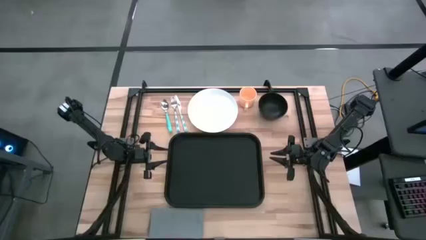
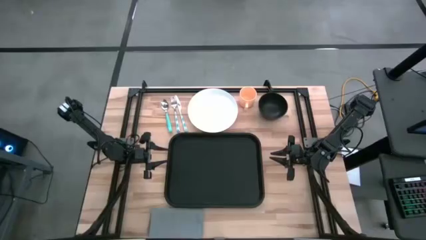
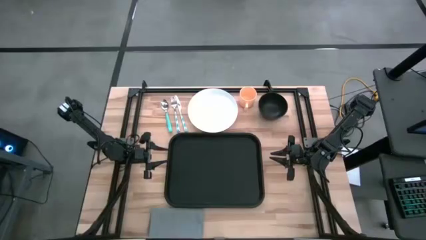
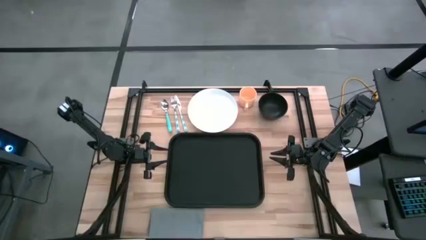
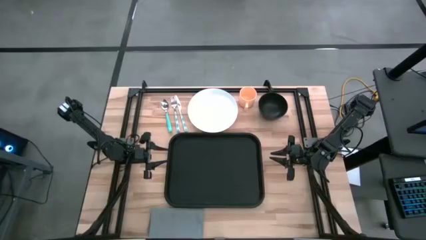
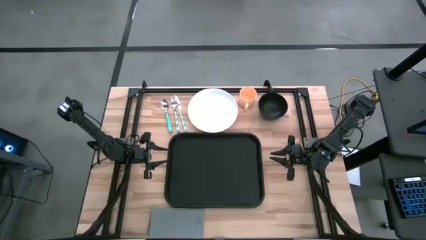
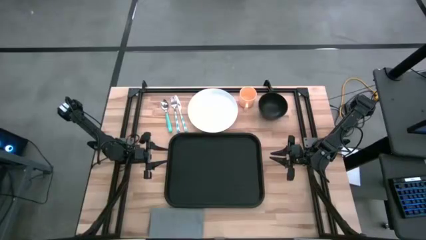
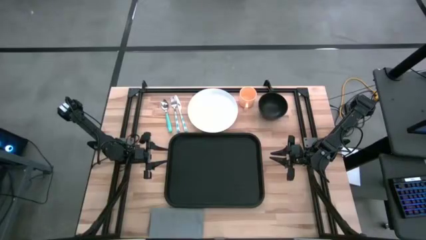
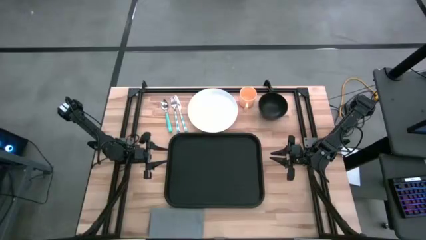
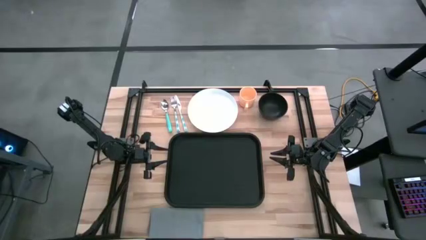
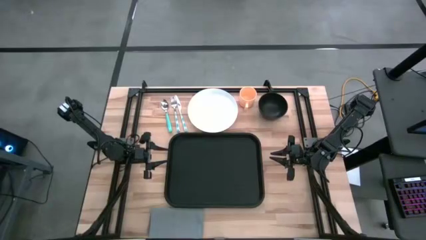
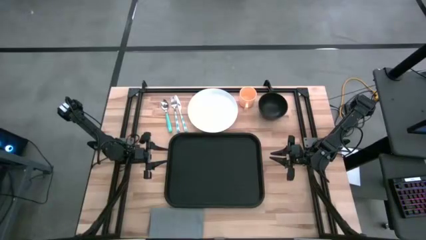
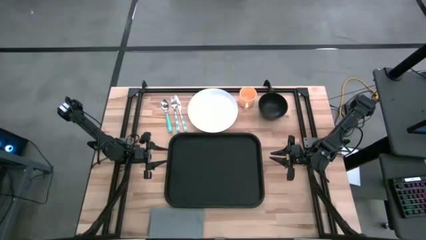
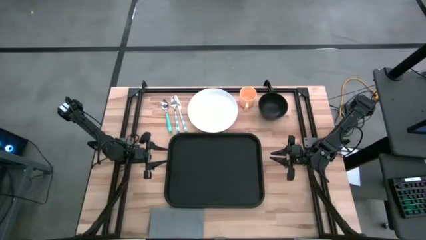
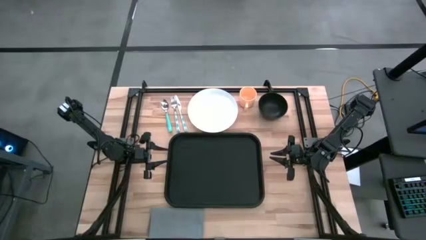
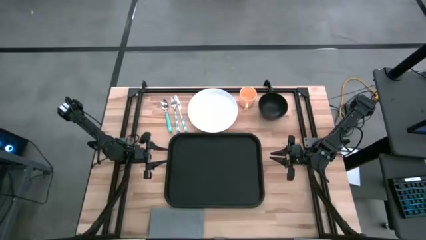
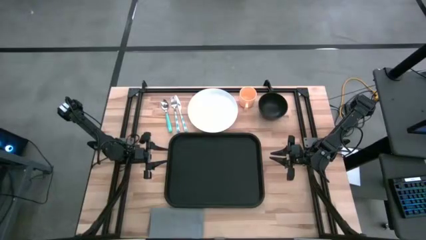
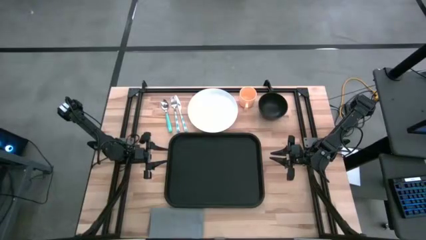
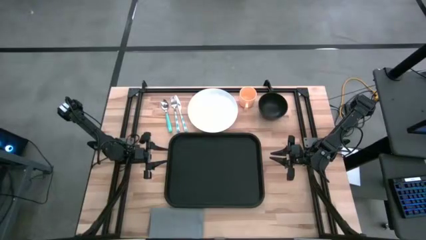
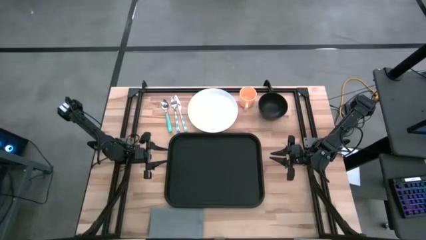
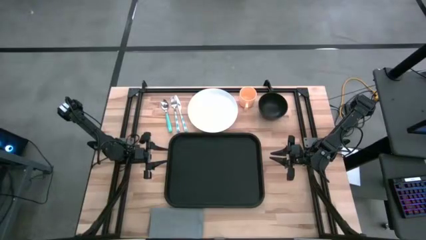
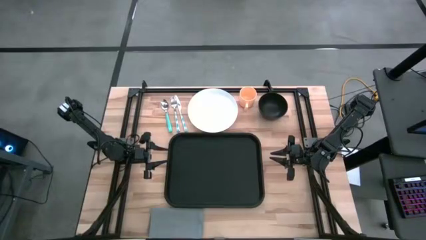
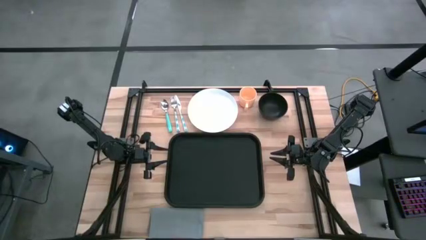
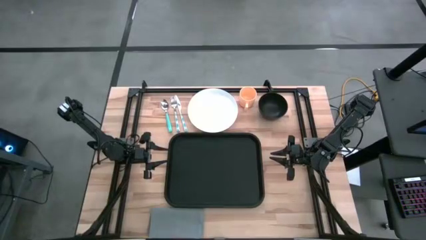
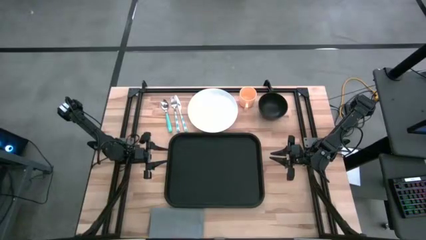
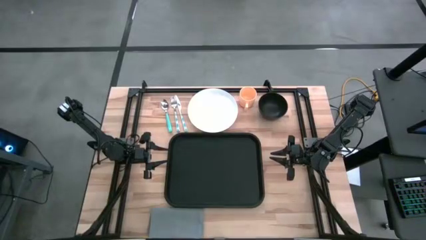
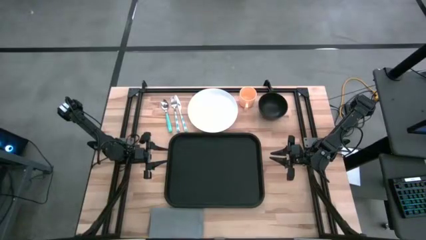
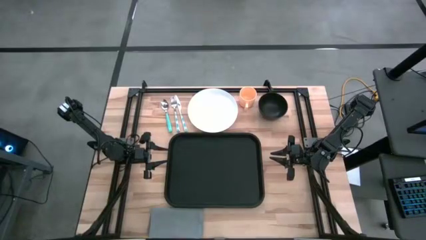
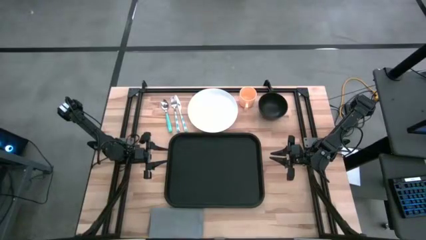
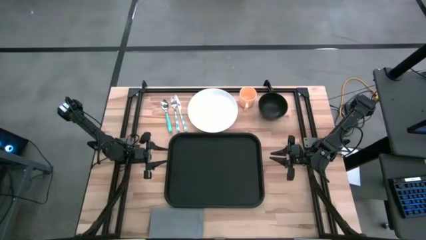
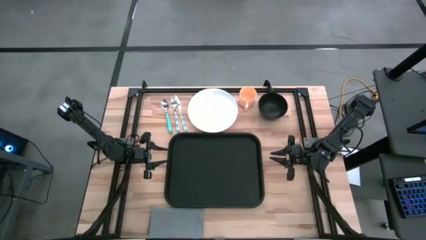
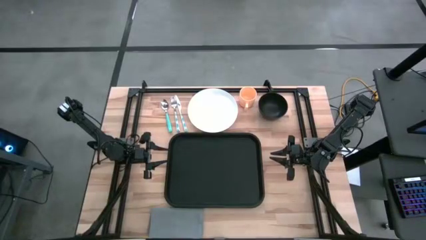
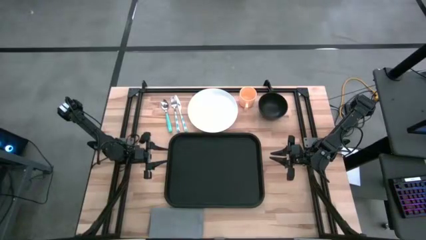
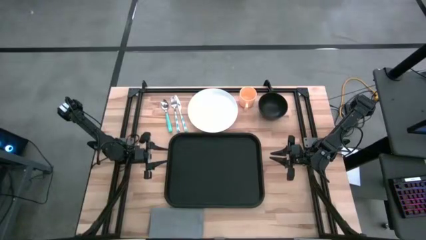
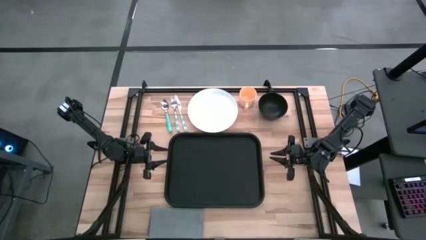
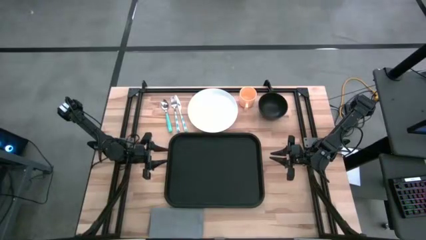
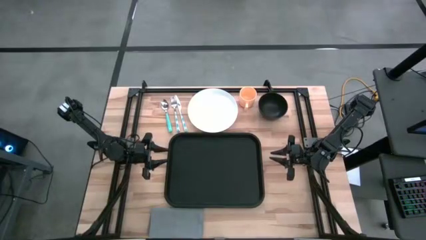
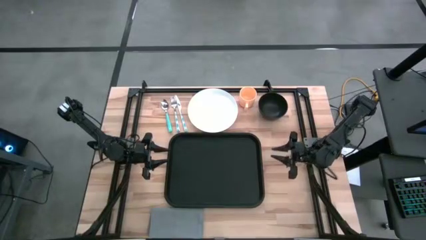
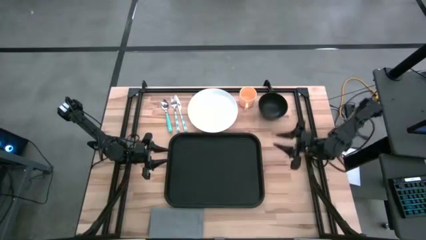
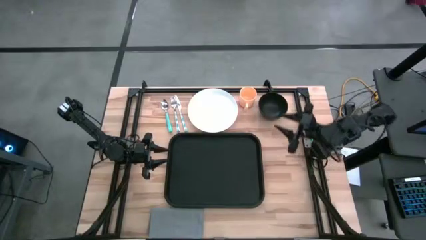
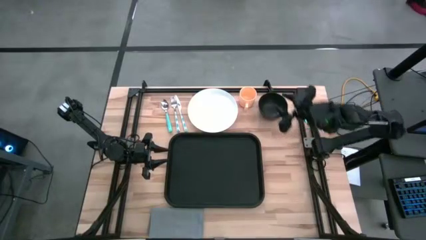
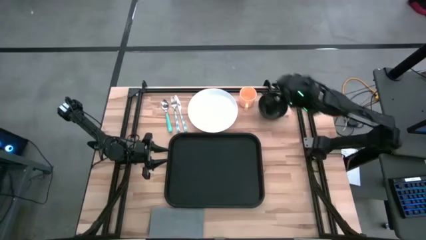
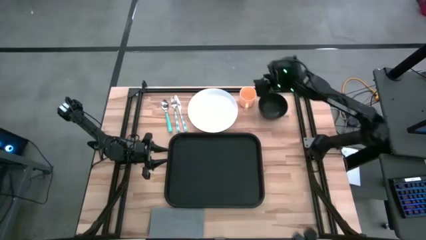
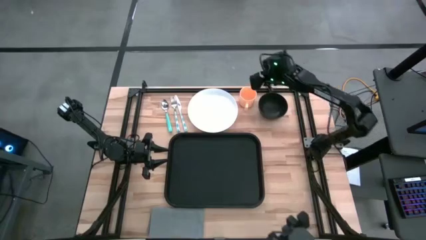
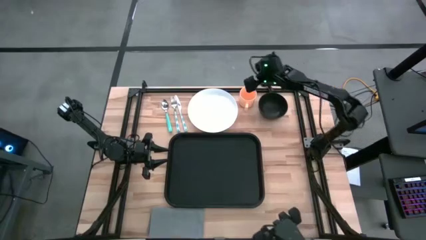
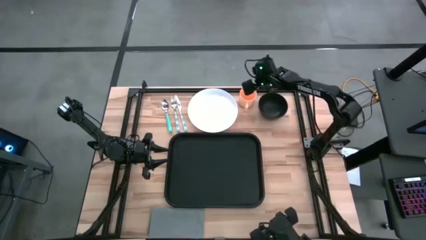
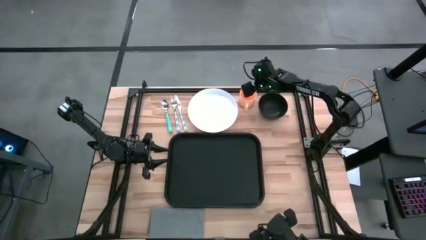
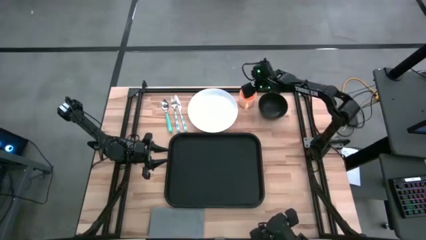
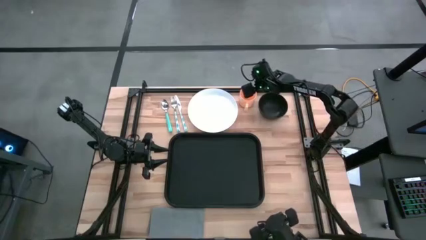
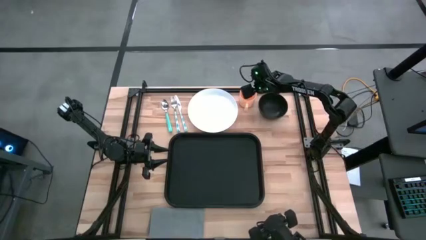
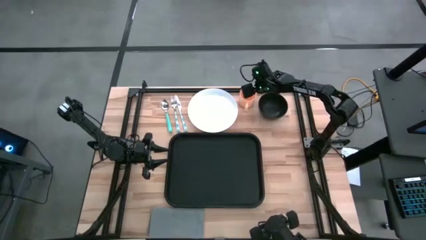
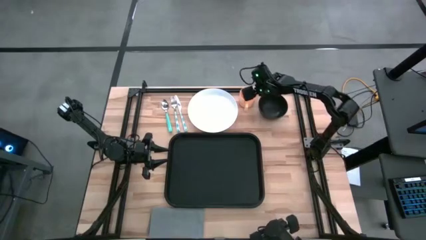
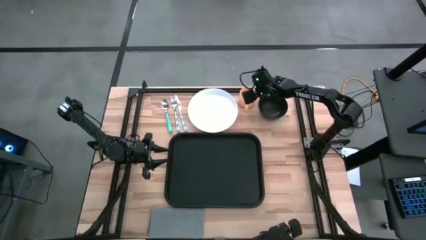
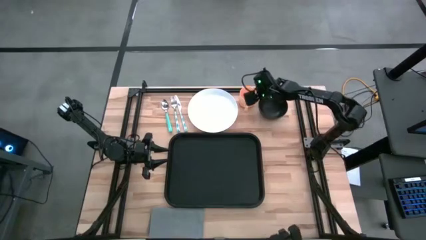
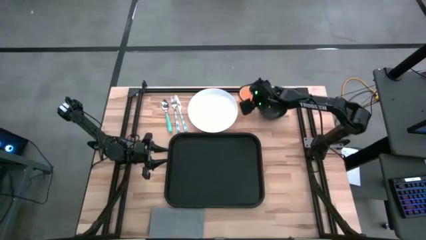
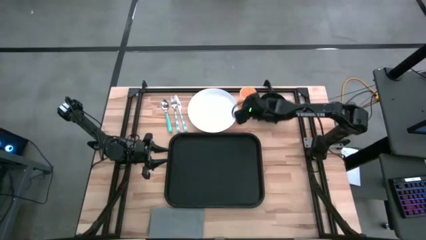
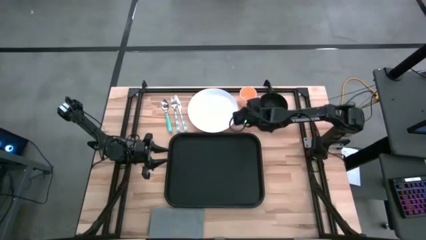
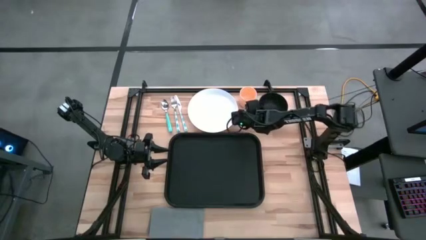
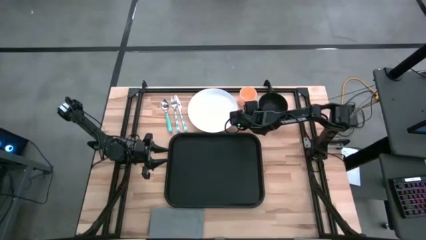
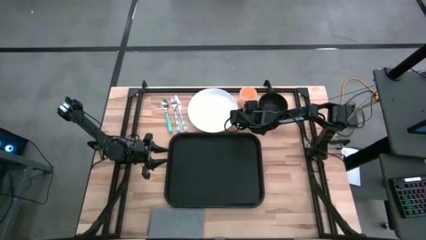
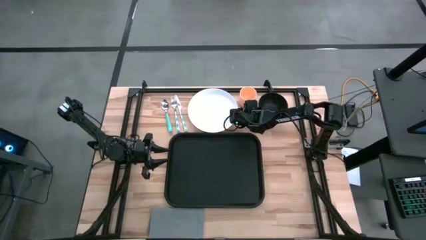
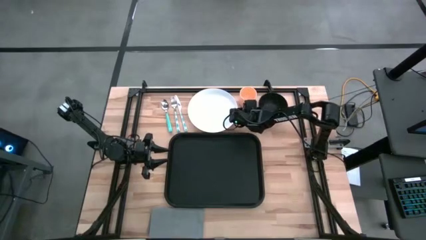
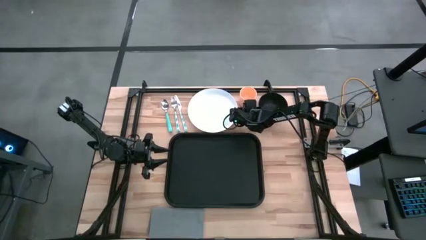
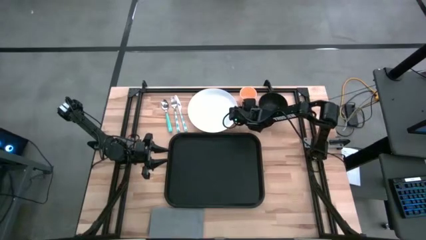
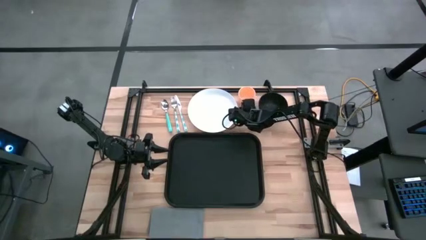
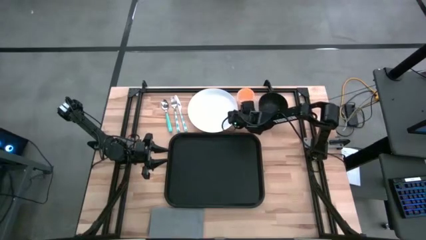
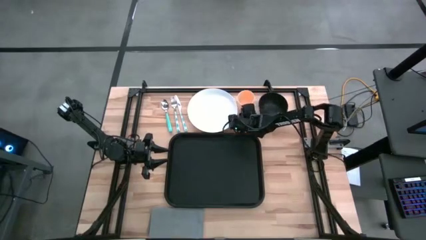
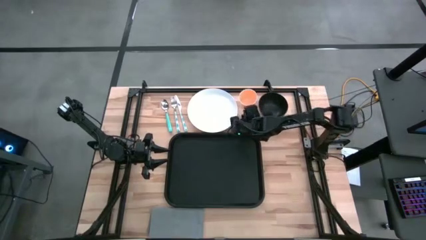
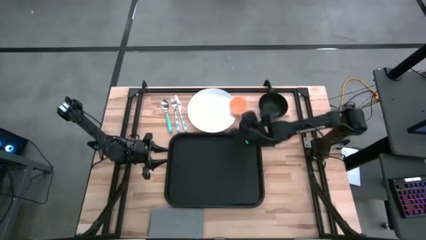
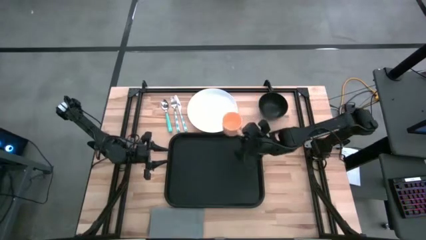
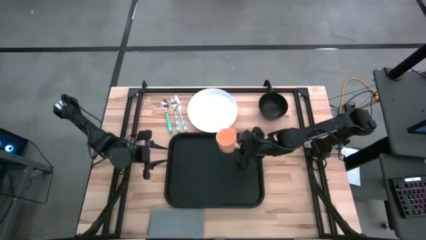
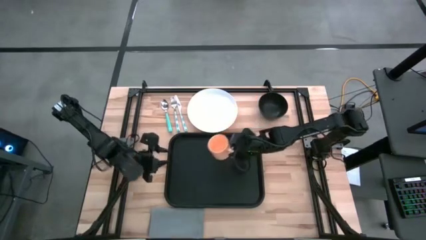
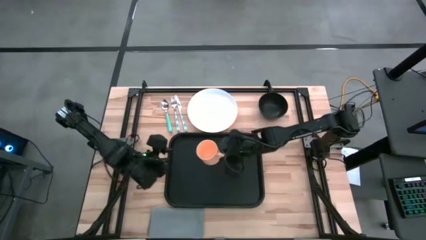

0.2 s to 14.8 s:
Task: Set up tray
Put the orange mug on the black serving tray
